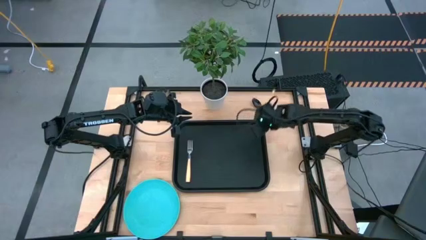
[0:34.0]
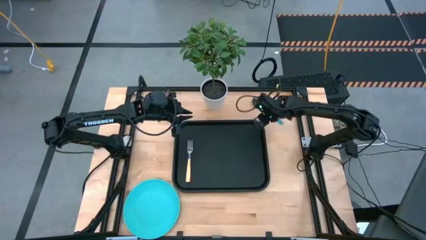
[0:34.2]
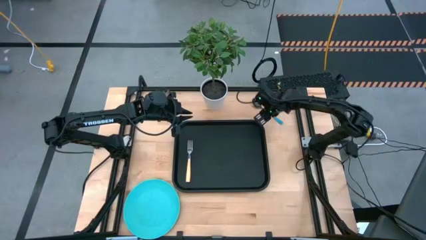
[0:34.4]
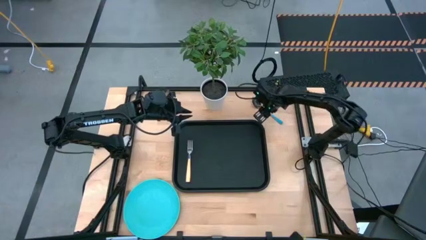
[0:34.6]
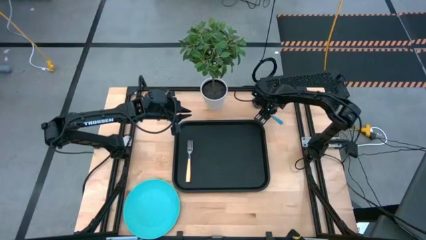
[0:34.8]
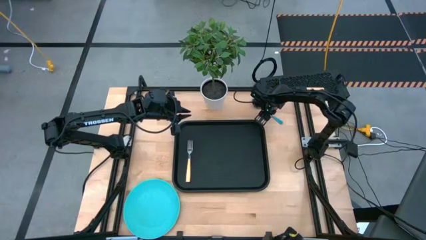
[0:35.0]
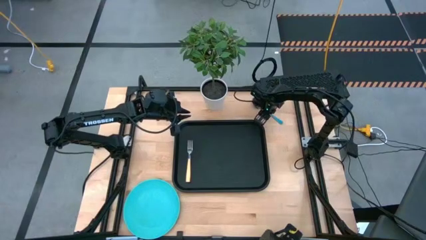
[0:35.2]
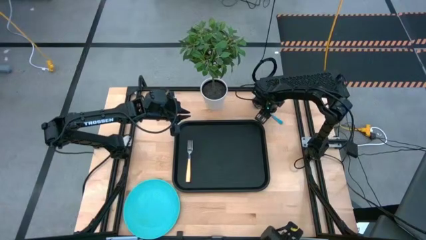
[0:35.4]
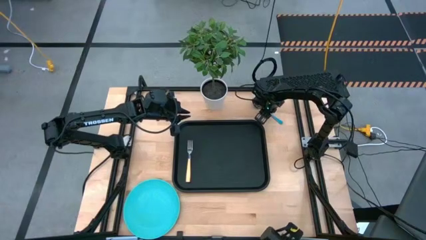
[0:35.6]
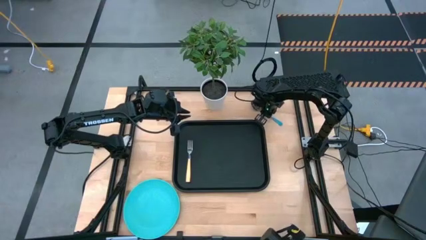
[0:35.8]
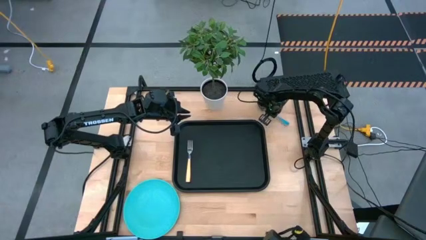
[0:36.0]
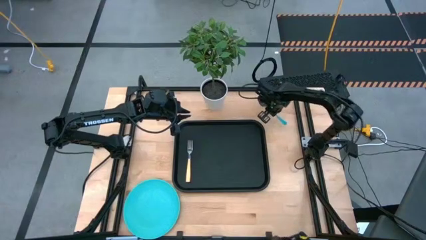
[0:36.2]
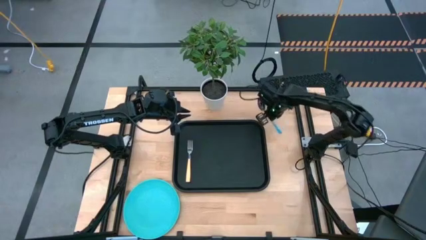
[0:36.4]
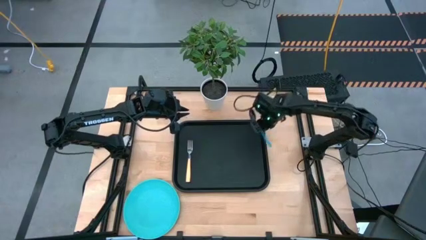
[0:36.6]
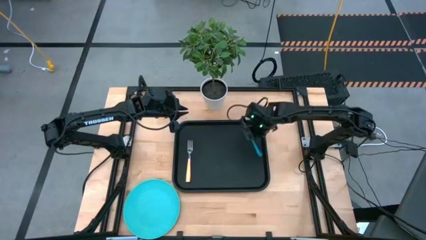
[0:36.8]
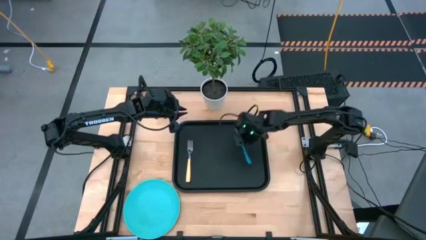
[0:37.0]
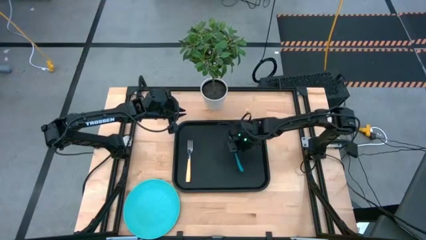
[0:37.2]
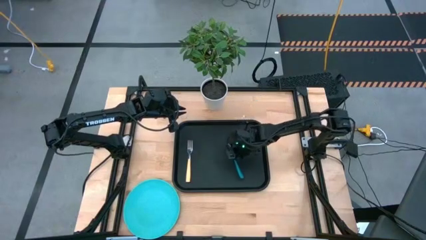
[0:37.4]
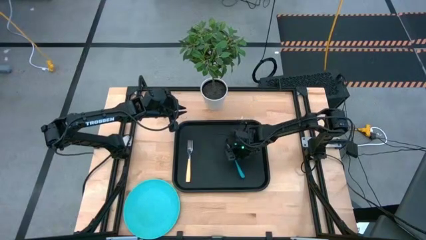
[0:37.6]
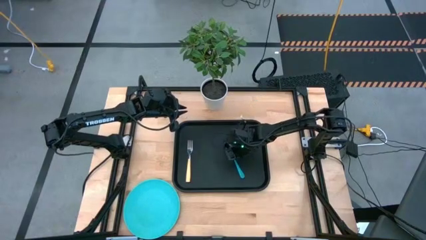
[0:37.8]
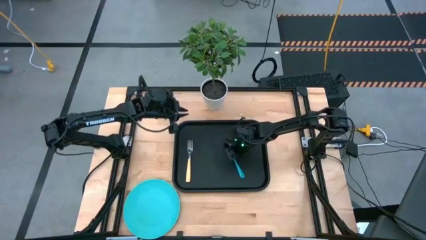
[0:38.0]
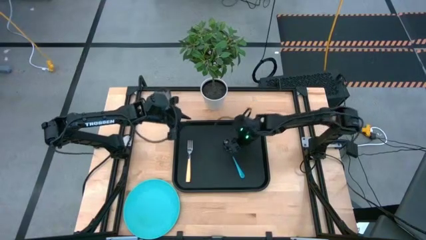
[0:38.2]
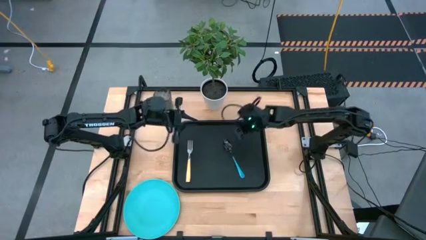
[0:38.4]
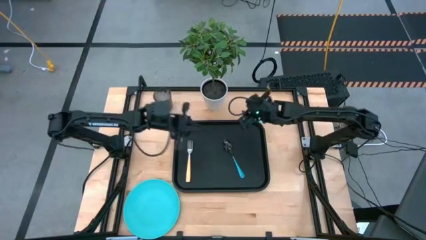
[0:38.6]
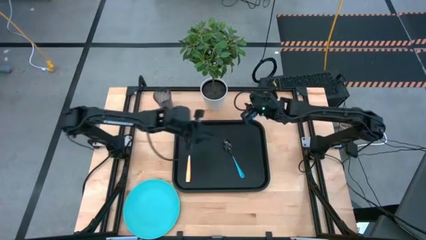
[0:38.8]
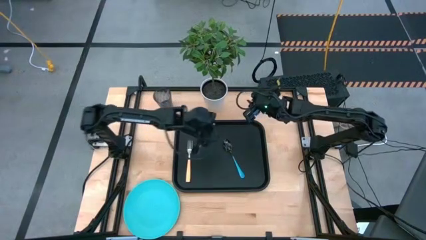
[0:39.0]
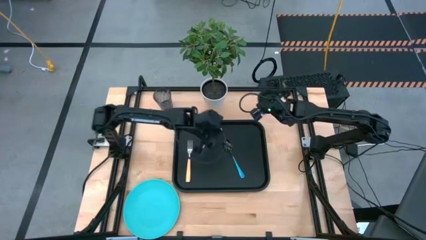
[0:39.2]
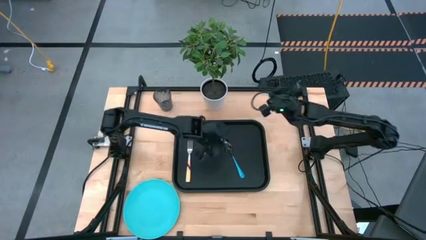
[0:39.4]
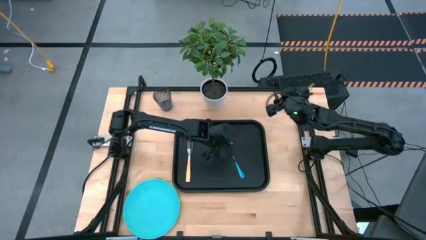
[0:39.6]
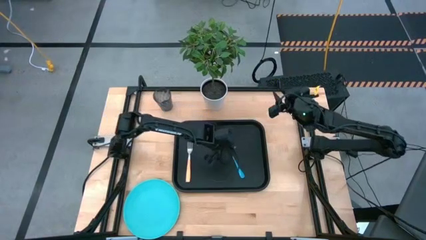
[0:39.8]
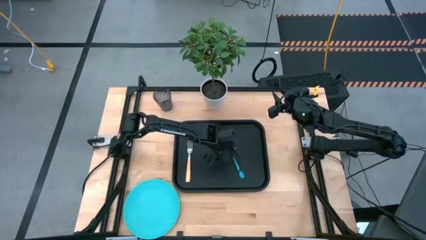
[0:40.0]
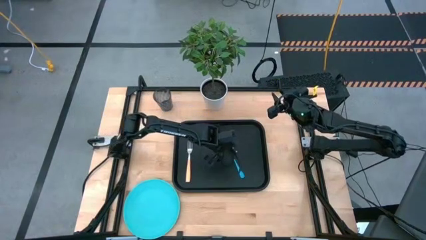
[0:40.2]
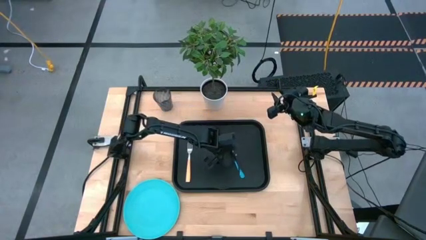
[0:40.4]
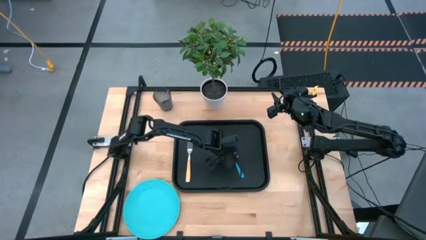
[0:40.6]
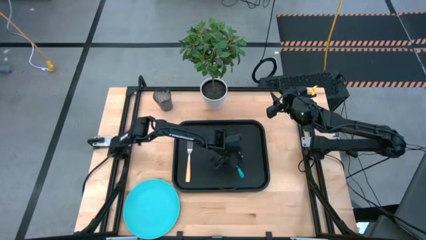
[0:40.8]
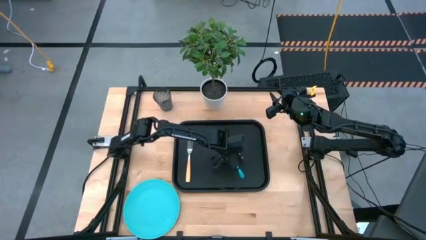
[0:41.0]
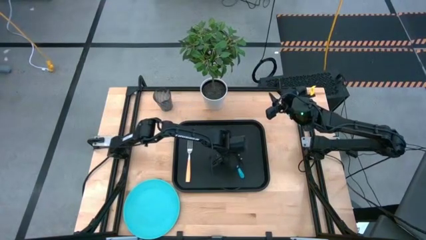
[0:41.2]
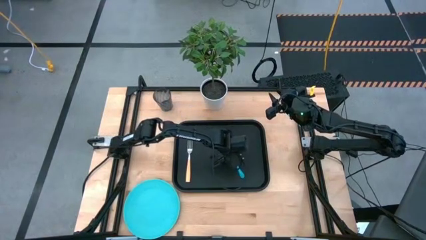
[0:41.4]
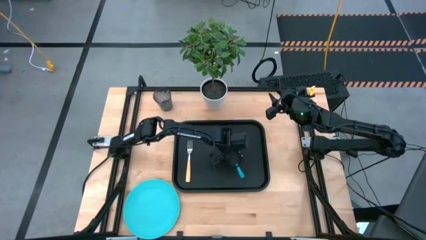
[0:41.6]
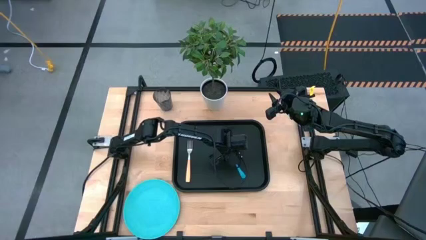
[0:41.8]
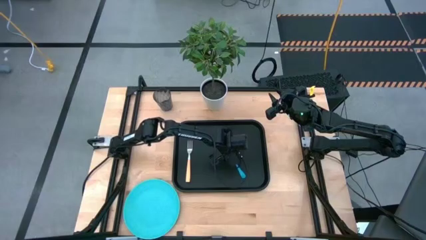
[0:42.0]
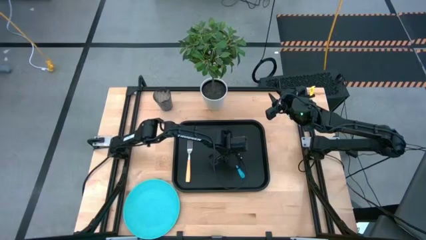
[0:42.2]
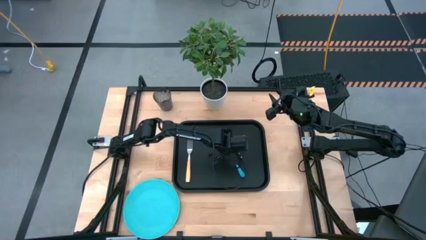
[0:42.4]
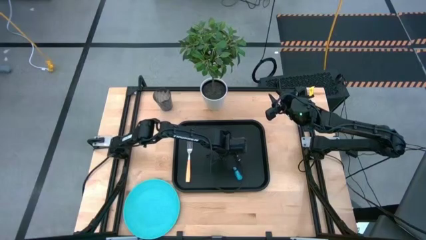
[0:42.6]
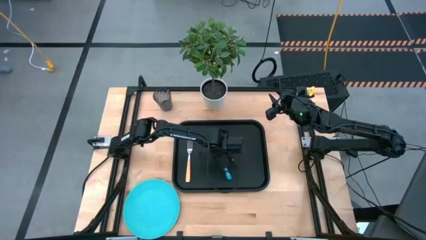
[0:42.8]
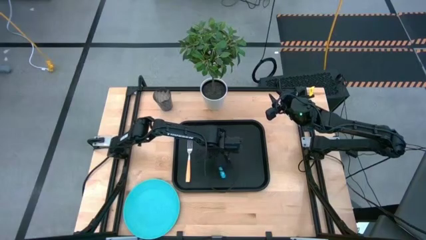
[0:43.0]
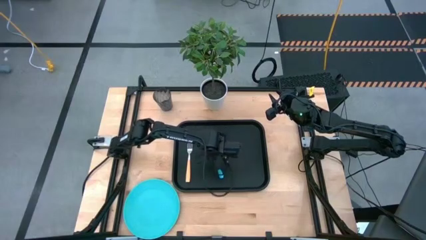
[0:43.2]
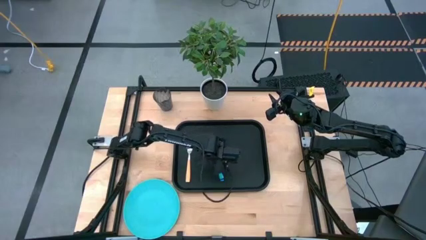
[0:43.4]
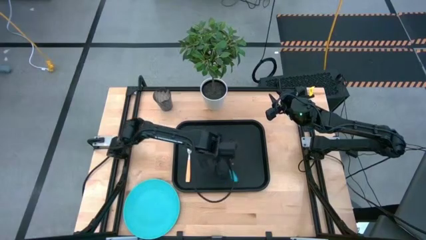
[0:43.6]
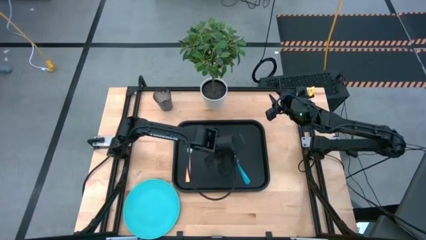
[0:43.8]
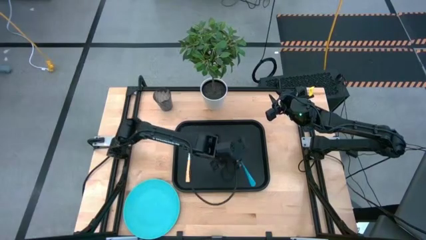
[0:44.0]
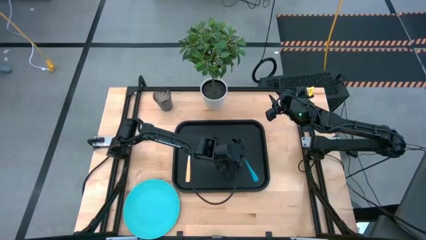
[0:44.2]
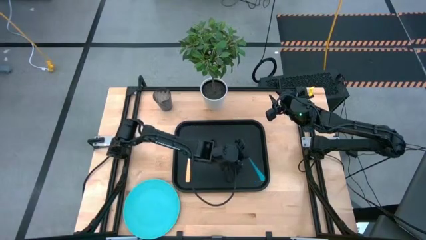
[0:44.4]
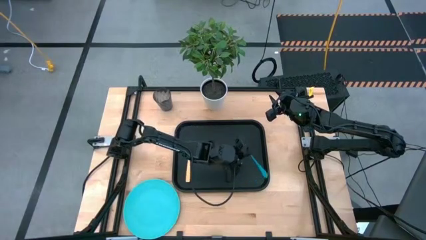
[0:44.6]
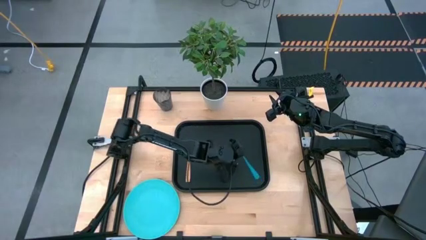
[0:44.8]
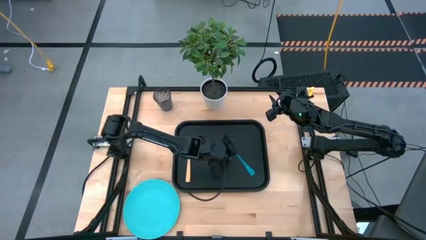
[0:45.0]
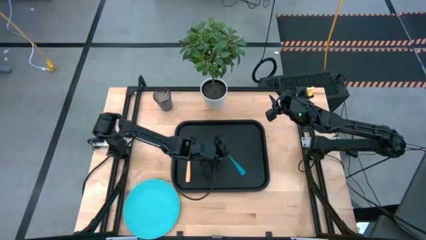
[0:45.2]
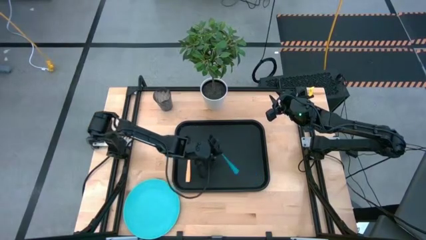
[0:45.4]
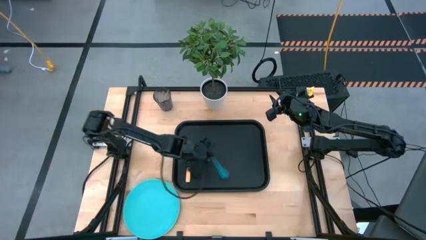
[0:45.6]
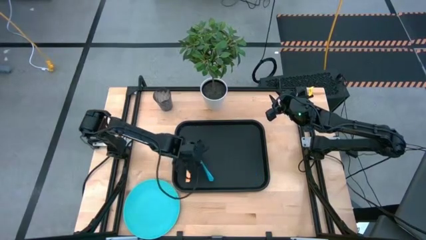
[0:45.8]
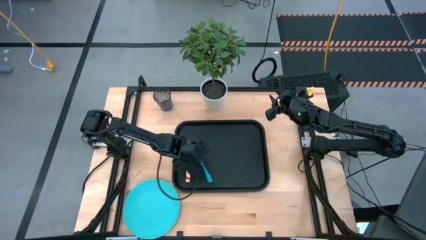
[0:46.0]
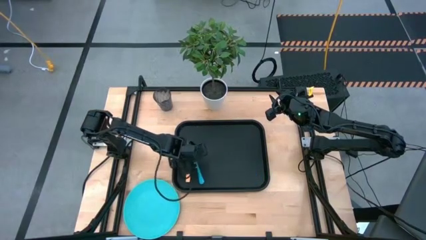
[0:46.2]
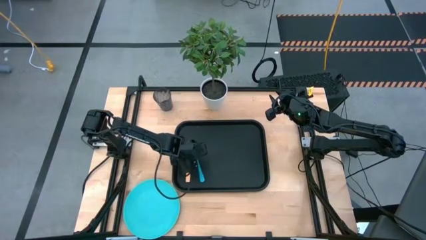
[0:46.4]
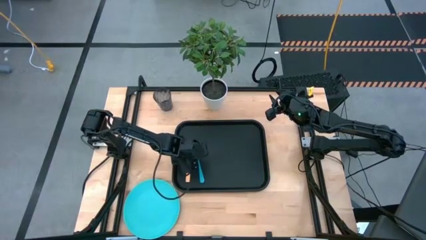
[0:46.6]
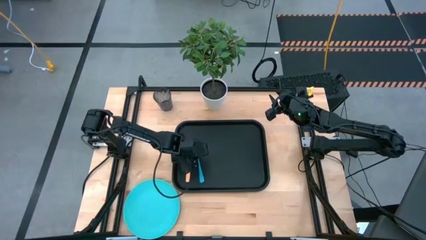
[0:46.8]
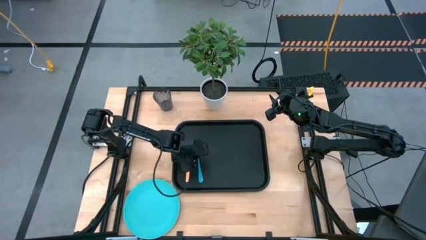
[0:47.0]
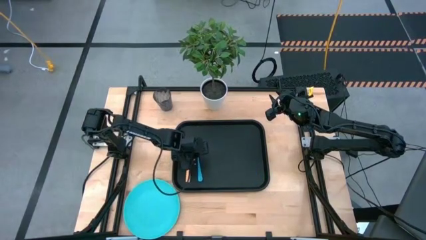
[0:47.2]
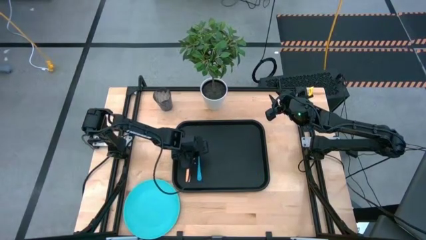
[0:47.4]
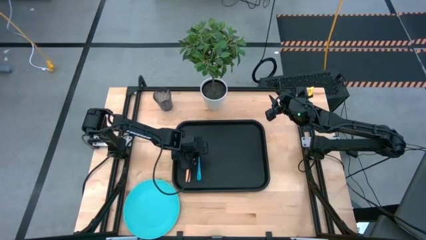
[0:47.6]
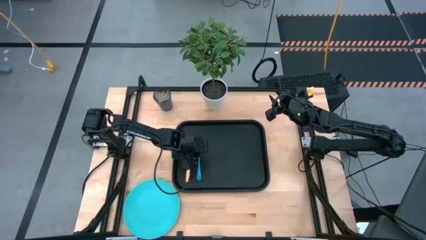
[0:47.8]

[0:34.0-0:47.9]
Task: Pick and place plate/cup/fork/spoon on tray
Put the blue spoon on the black tray

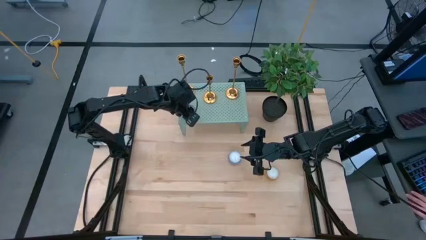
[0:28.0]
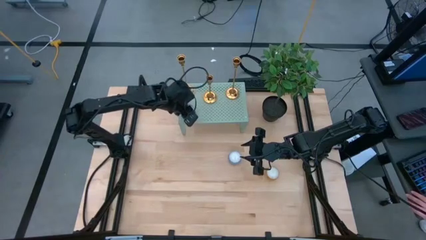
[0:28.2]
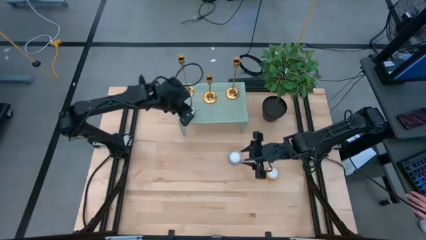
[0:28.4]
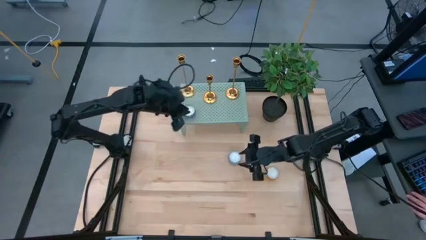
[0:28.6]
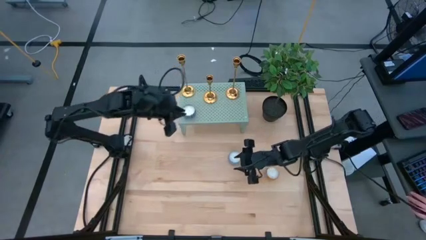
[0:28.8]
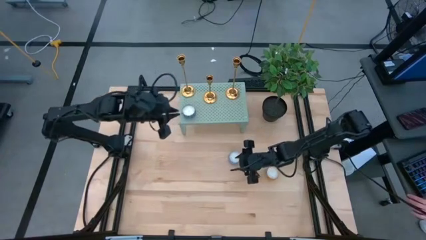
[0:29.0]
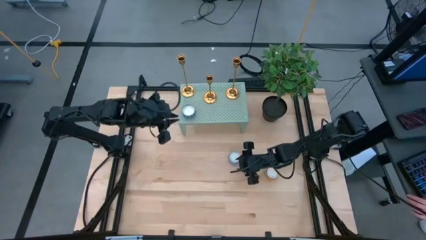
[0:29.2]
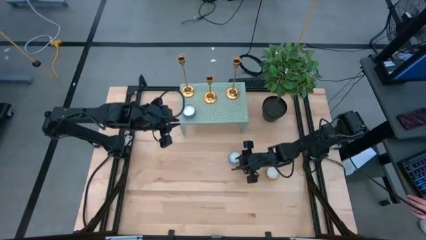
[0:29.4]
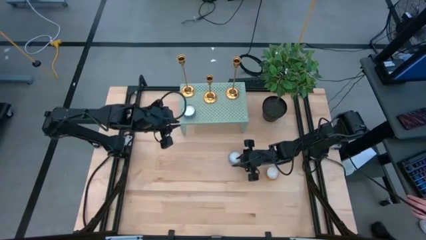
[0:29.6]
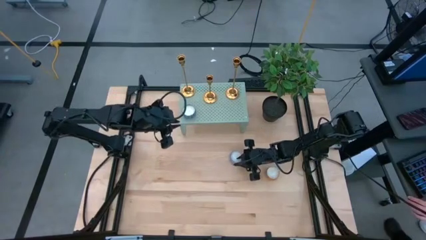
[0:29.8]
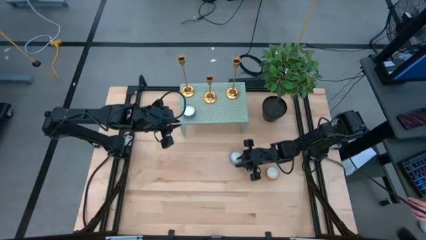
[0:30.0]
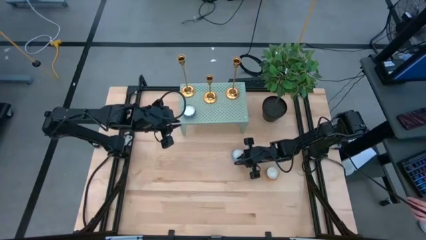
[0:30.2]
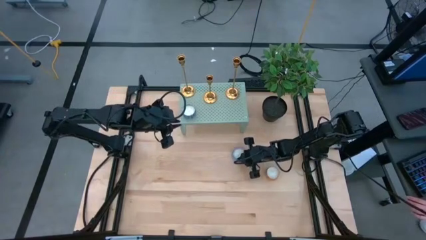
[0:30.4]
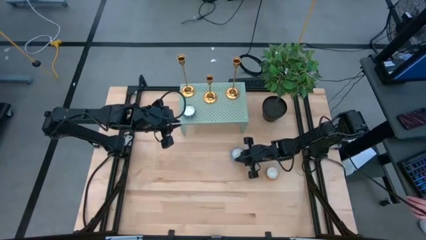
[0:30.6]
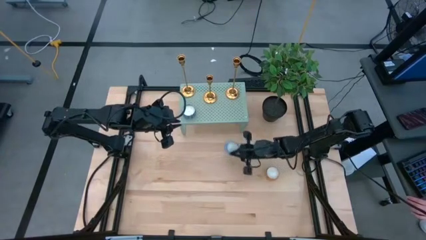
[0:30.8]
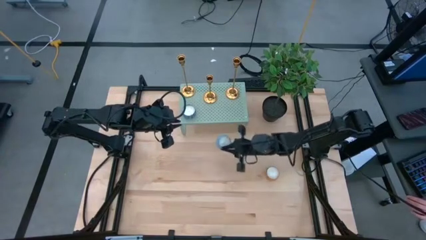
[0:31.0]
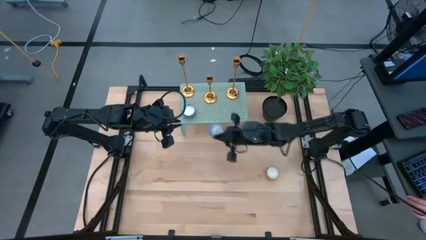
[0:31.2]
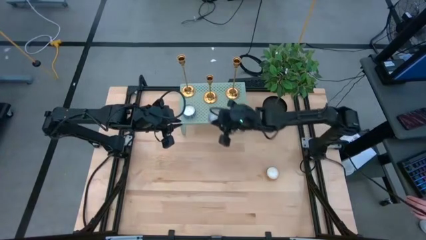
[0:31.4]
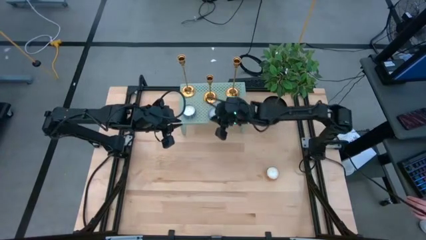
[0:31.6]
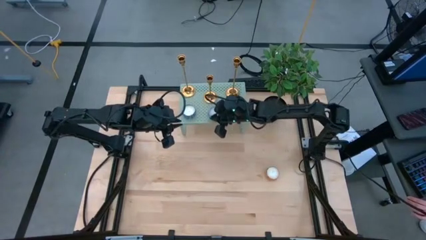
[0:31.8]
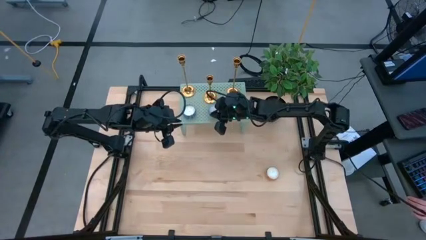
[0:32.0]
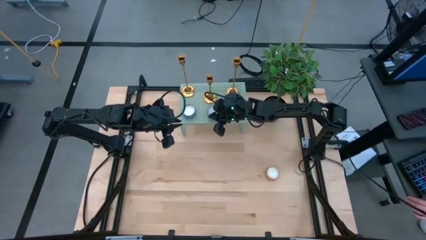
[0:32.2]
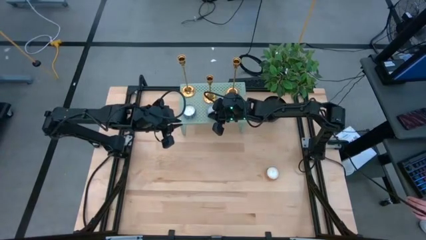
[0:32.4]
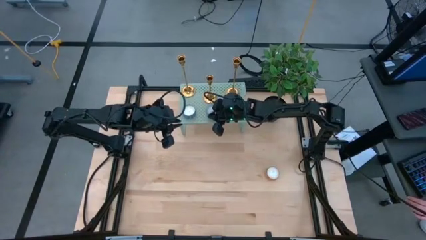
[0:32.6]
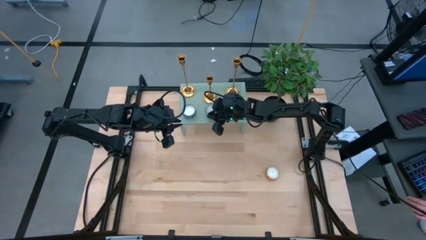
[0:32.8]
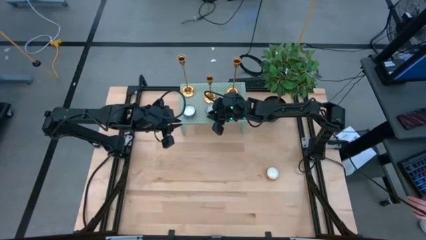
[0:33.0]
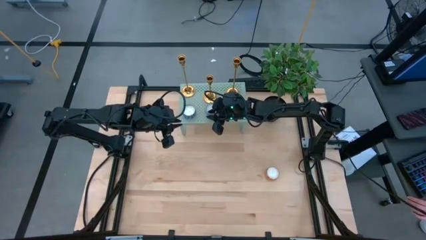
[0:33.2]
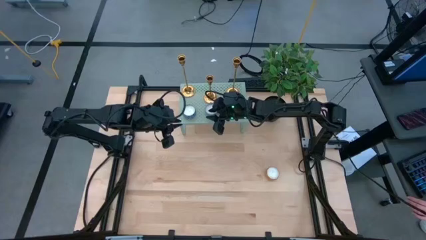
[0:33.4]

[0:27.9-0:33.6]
Task: Pick & Place candle stick holders
Put the blue scented candle on the shelf
